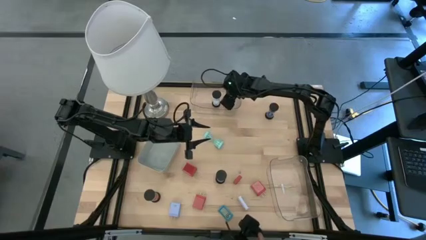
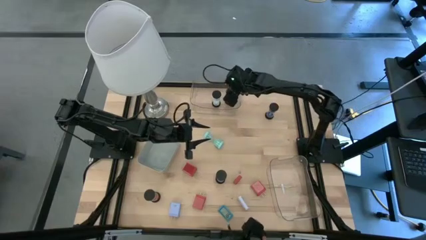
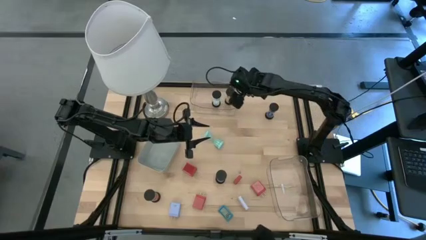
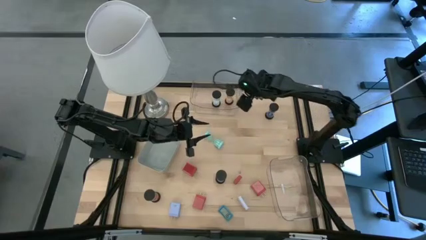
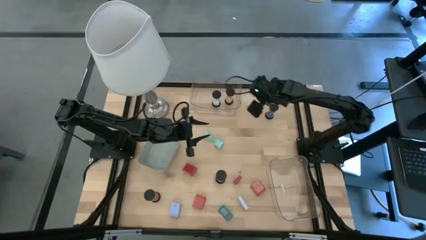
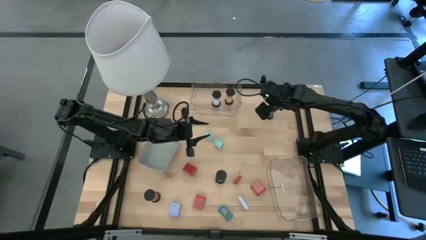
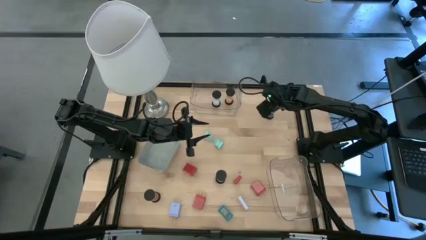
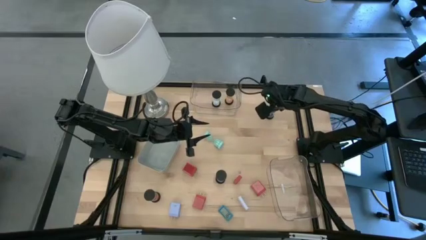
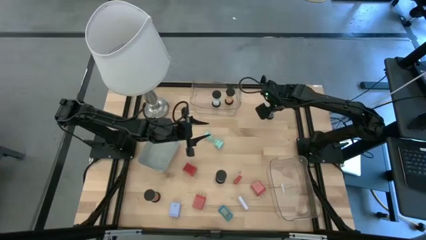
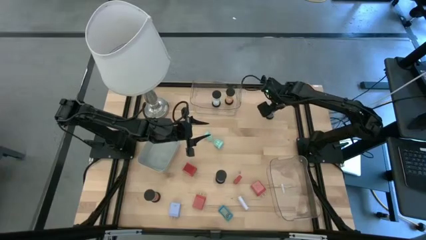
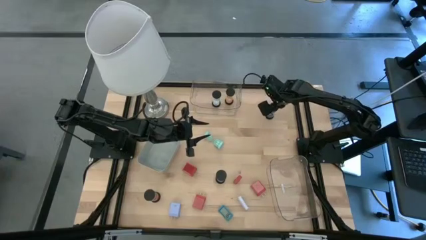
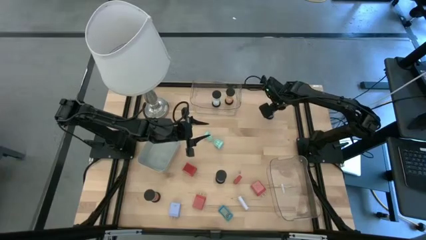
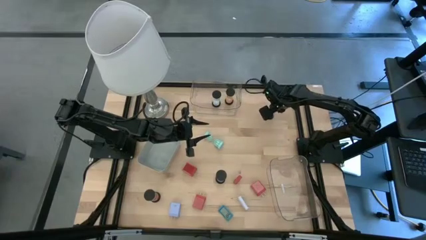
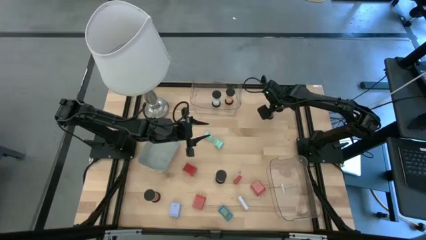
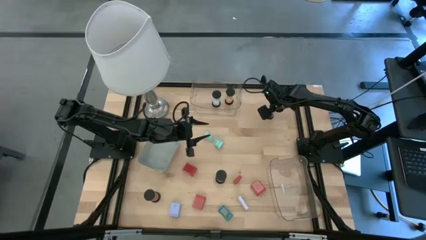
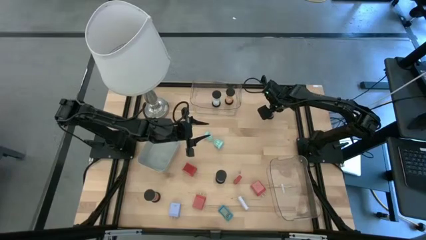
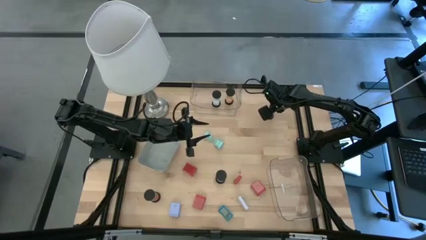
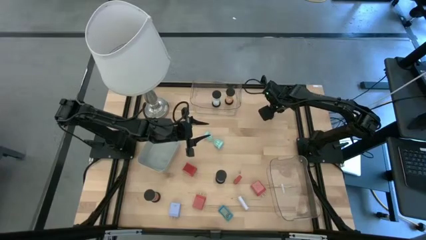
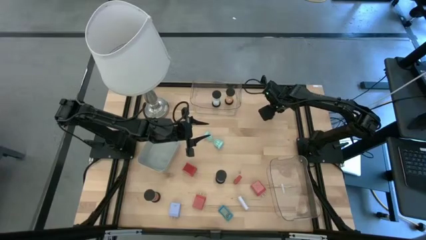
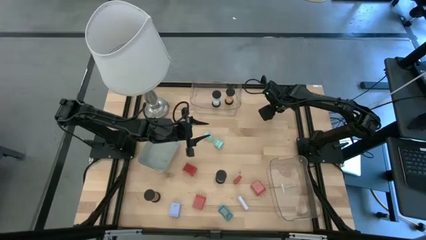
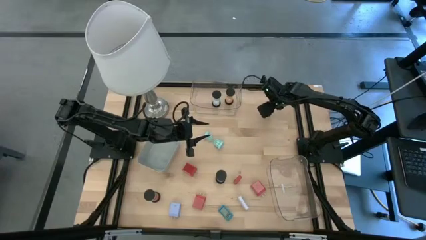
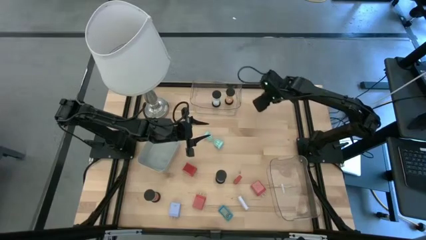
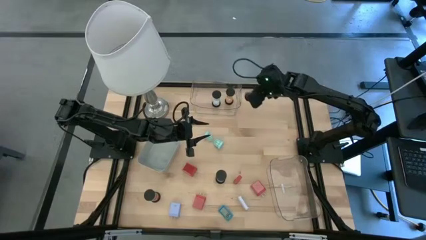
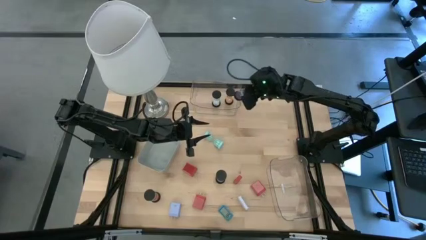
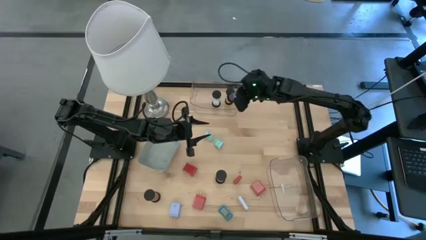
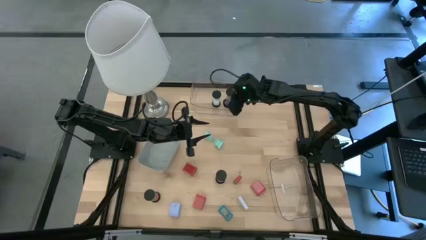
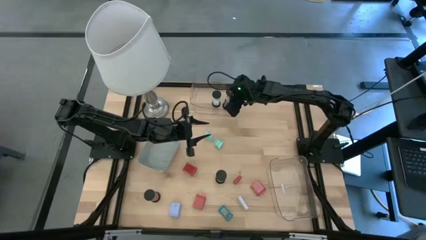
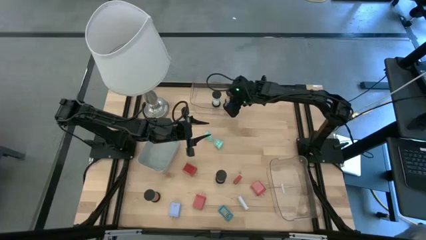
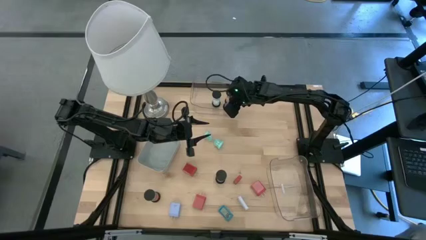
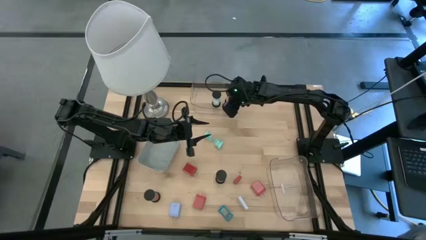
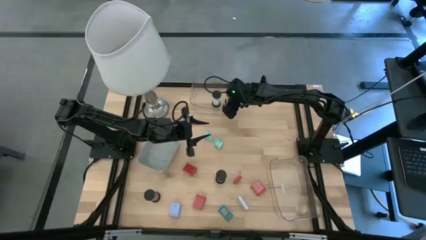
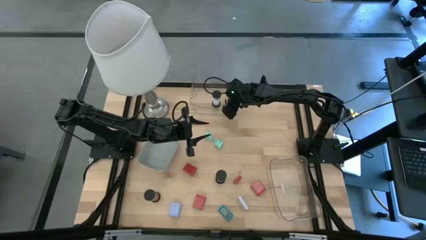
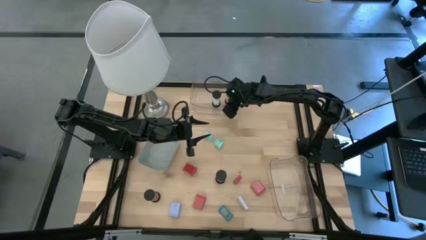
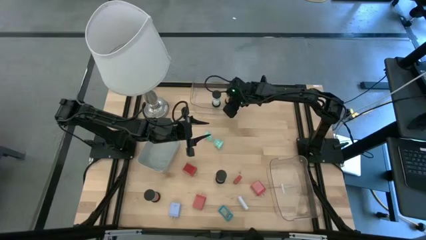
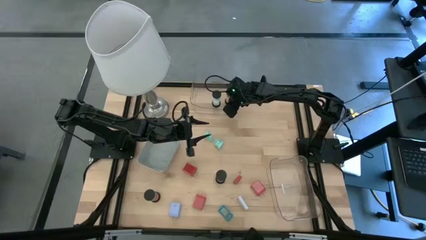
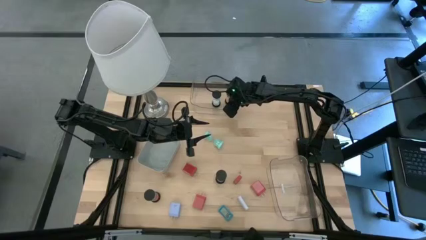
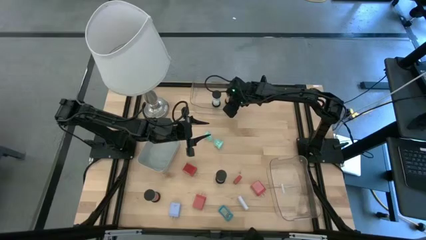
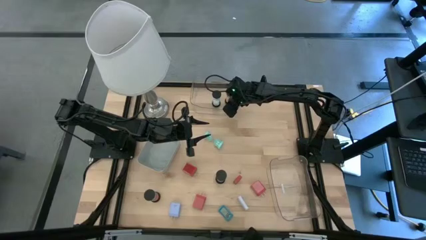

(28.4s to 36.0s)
Task: Pick & Place Office items
Put the purple hourglass into the top transparent bin

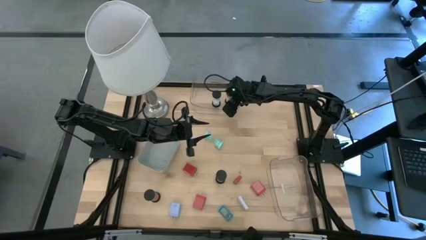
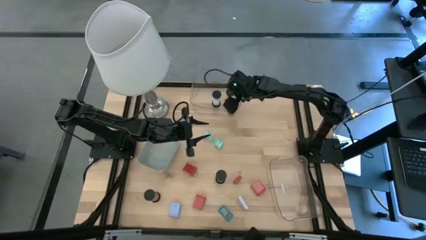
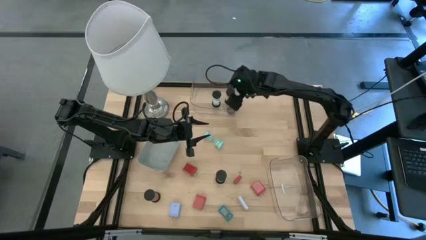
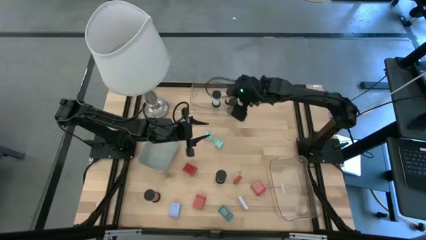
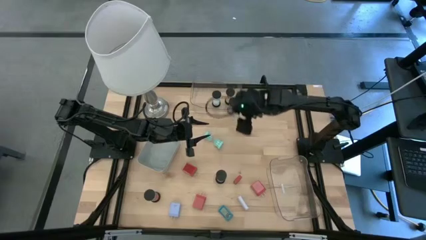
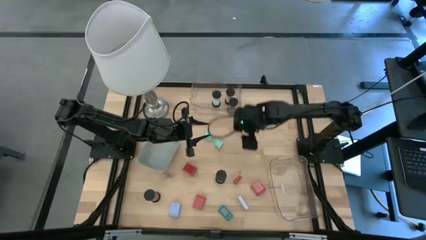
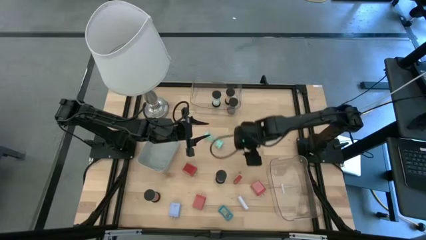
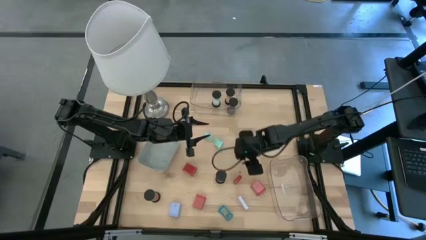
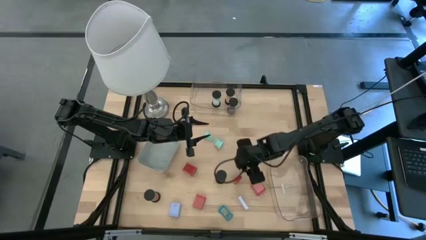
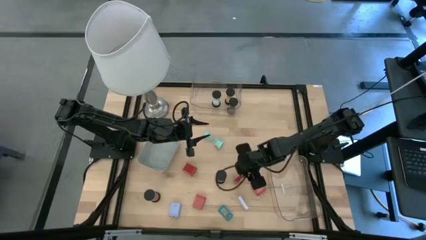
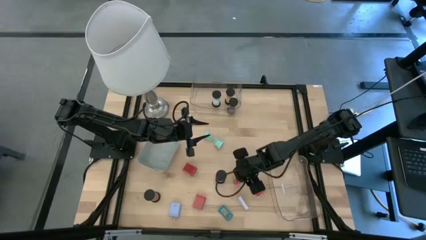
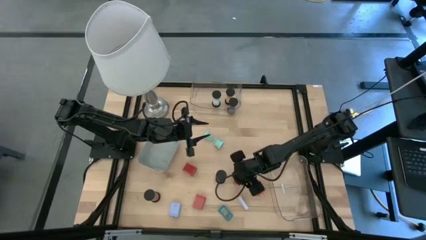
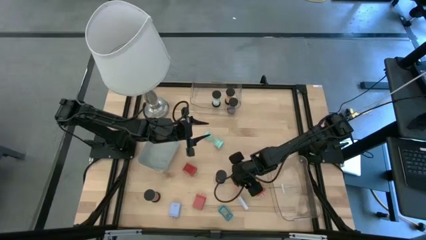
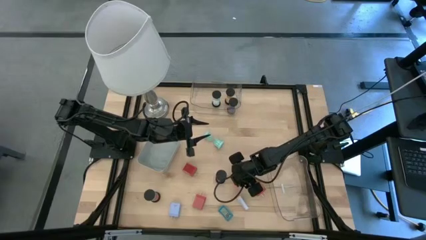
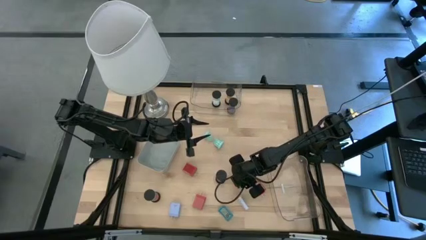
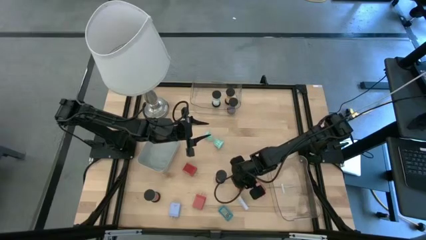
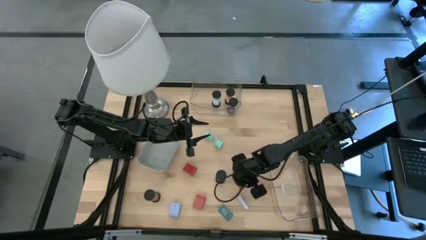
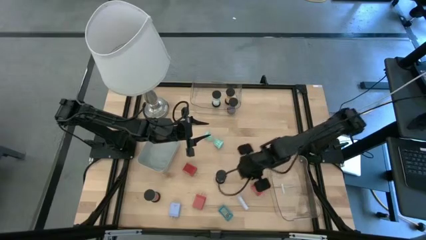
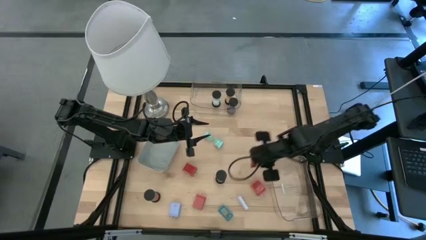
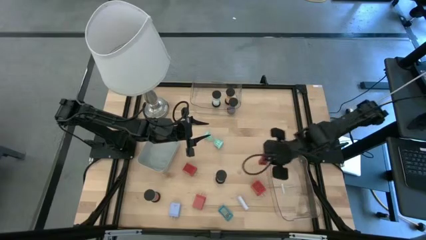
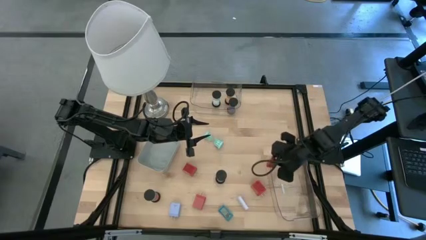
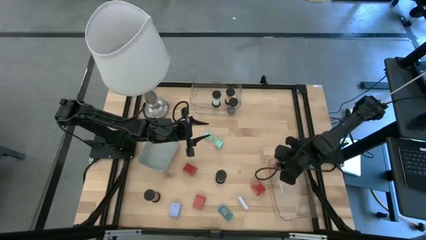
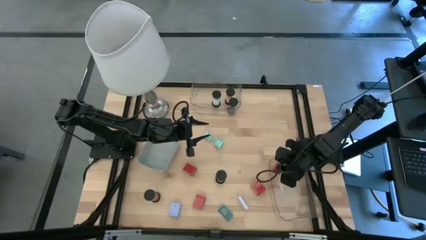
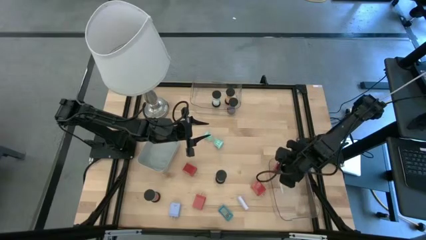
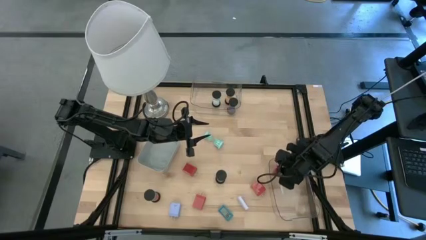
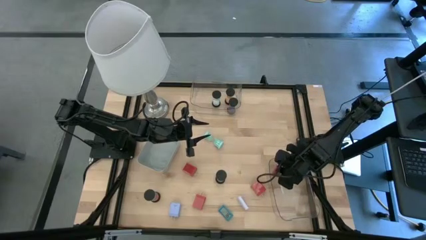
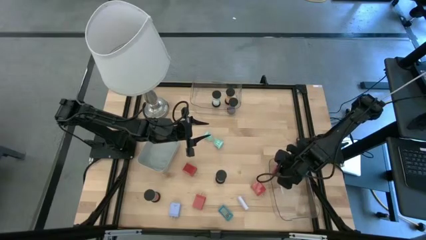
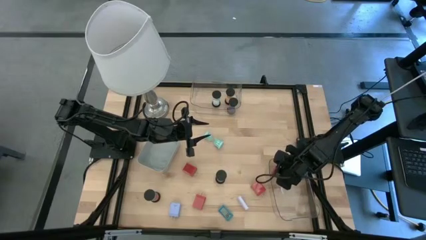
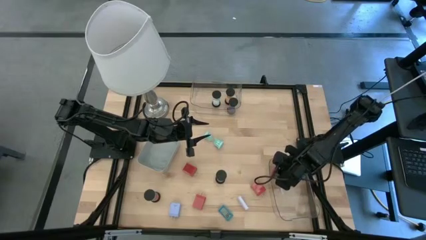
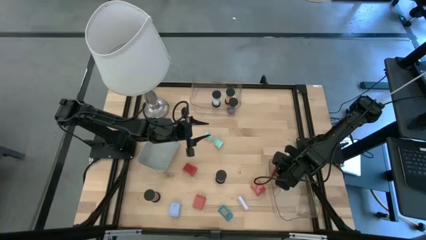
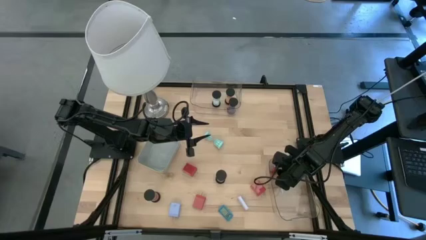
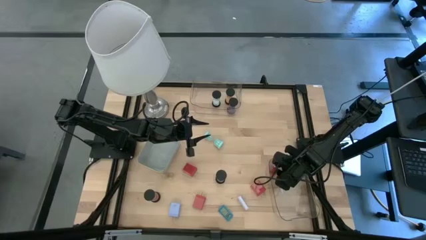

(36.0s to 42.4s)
Put the red digital timer into the bottom transparent bin

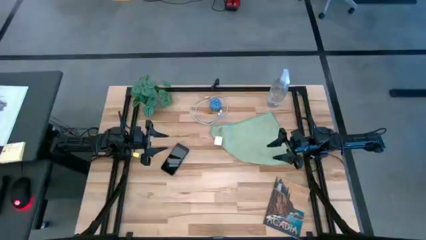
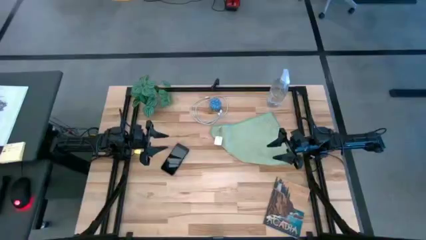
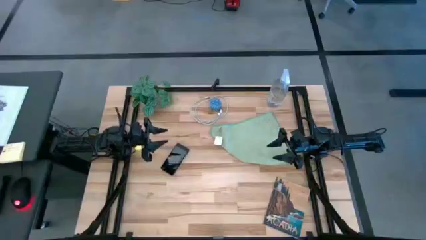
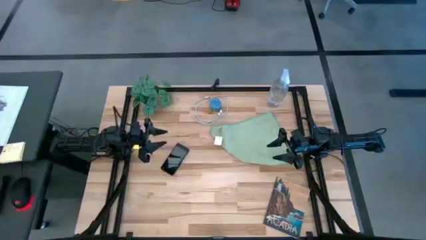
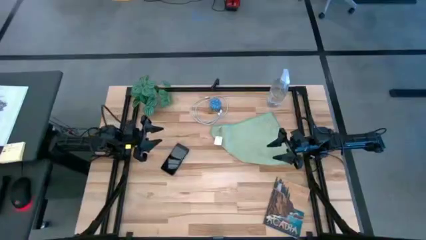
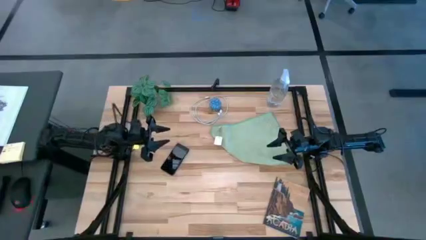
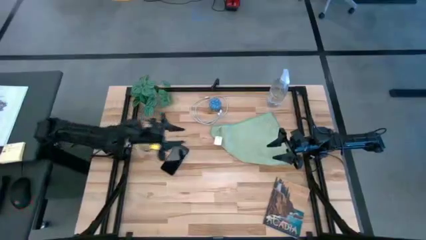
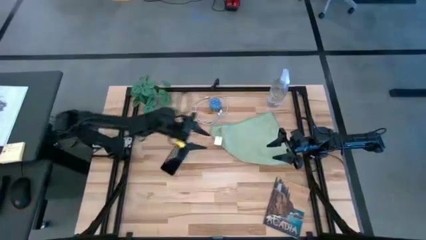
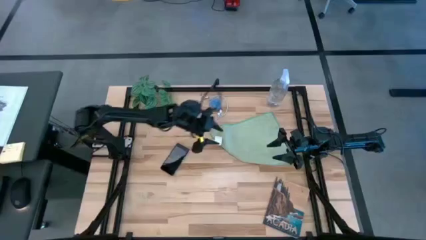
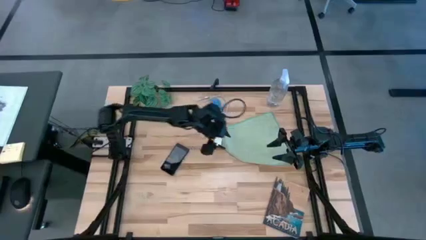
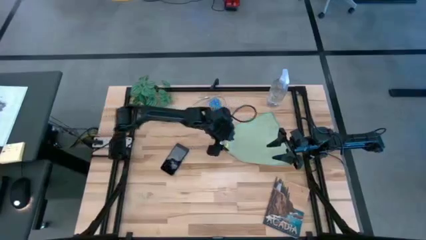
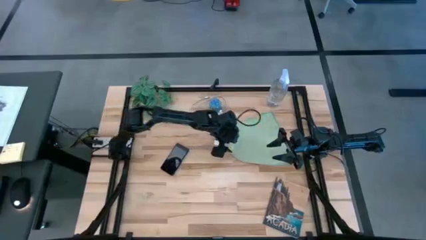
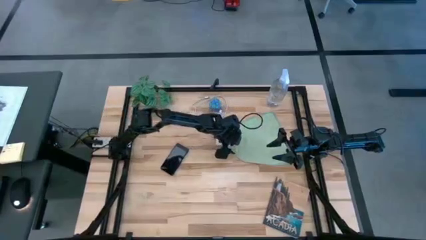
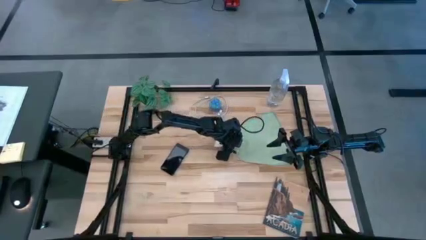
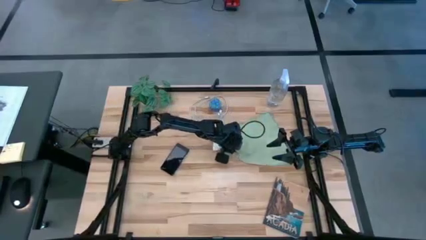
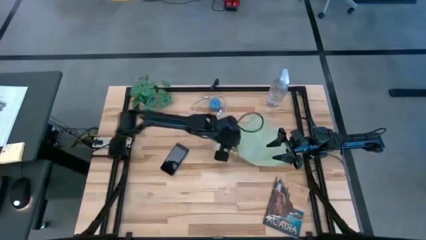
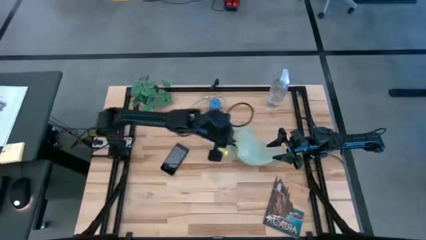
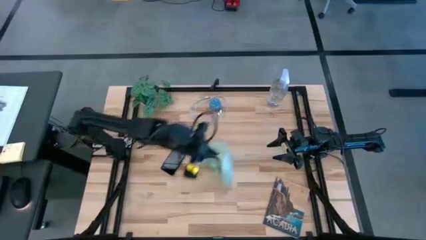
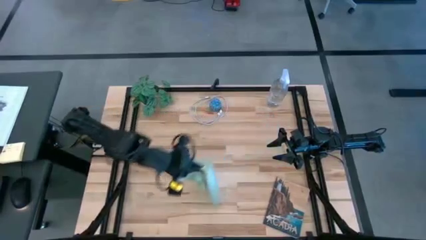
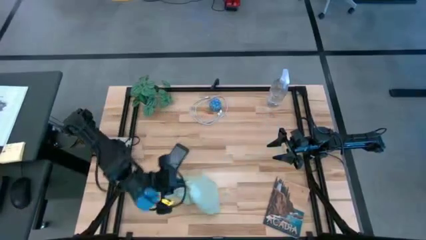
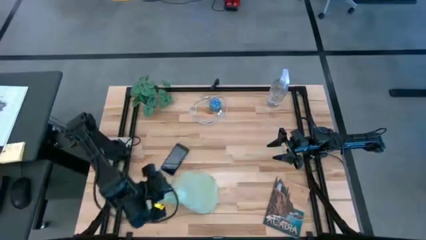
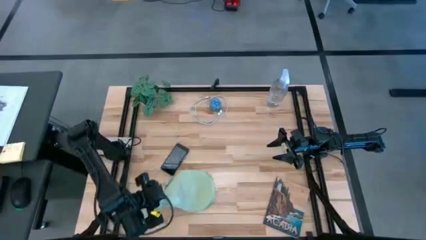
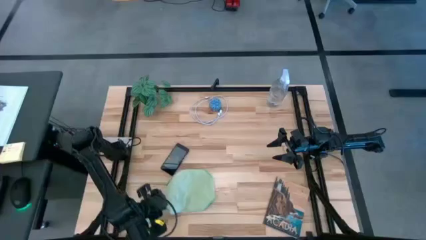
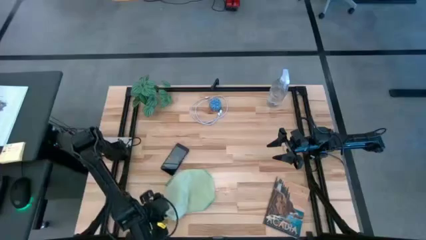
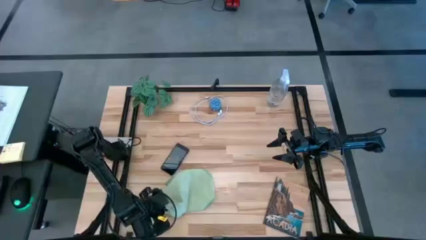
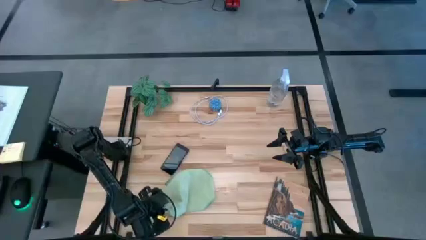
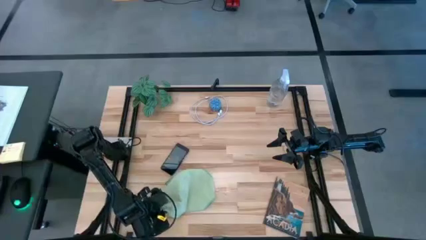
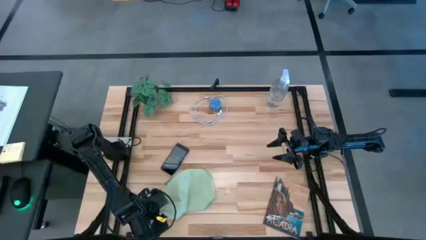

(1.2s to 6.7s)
Task: Apply microfiber cloth
Move the light green microfiber cloth to the bottom left of the table
